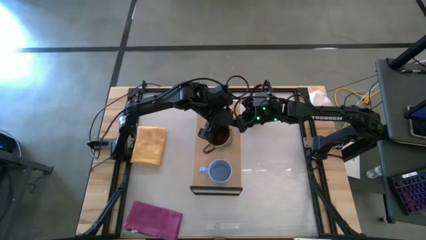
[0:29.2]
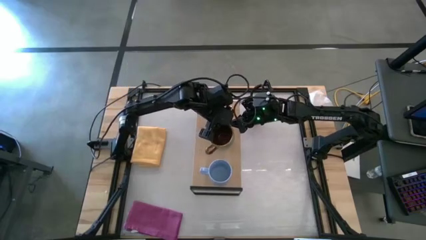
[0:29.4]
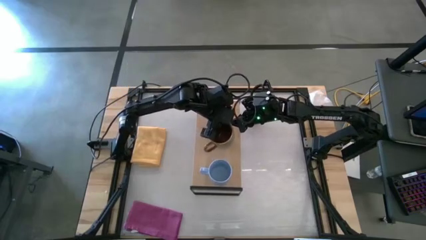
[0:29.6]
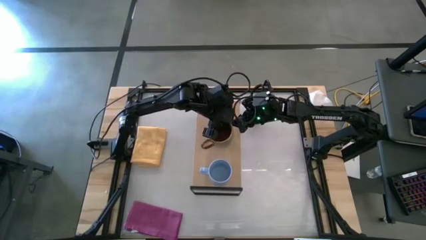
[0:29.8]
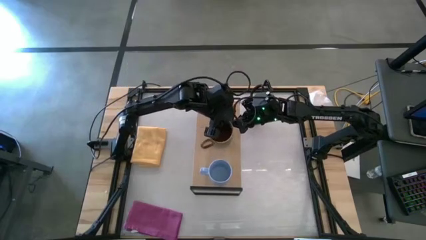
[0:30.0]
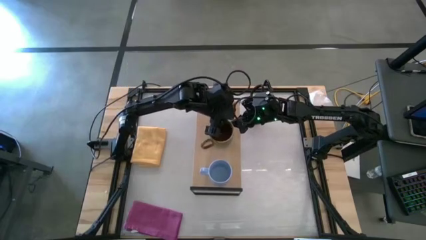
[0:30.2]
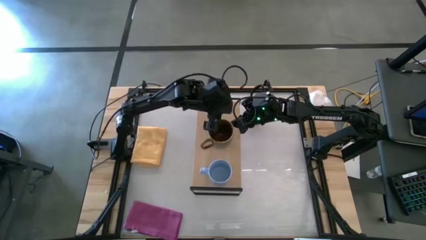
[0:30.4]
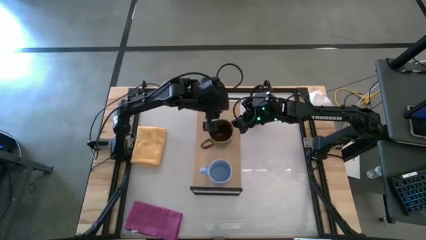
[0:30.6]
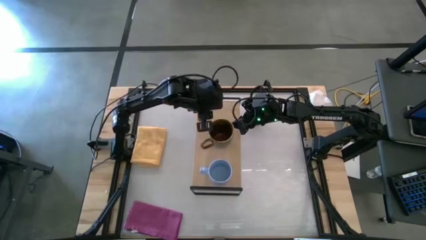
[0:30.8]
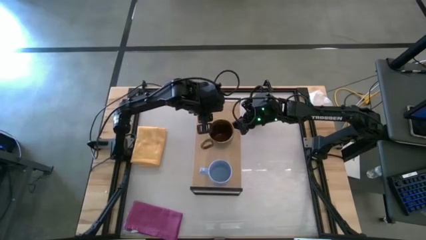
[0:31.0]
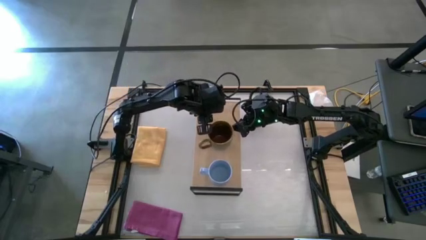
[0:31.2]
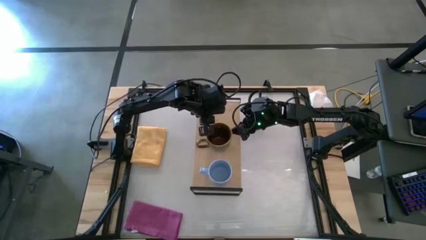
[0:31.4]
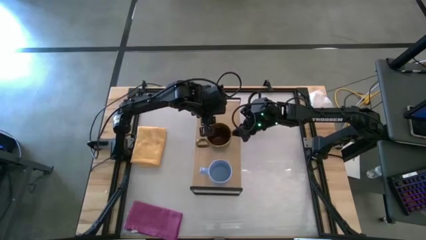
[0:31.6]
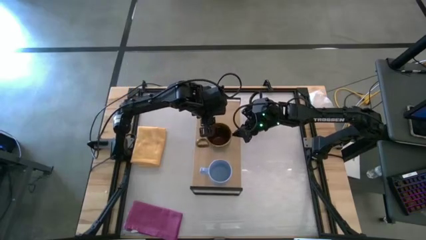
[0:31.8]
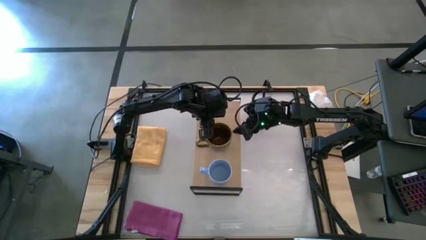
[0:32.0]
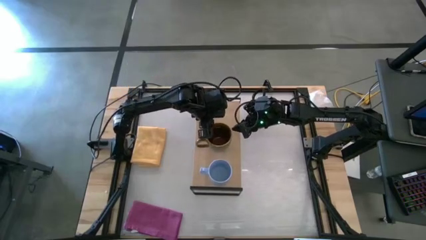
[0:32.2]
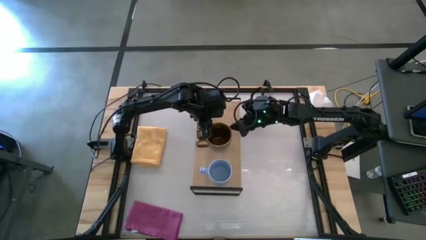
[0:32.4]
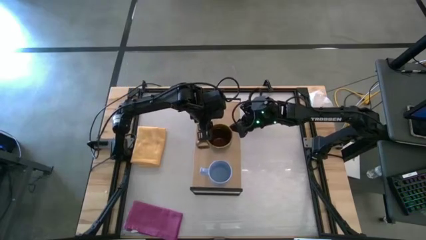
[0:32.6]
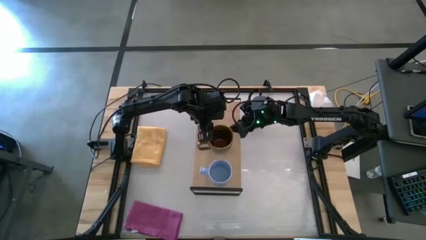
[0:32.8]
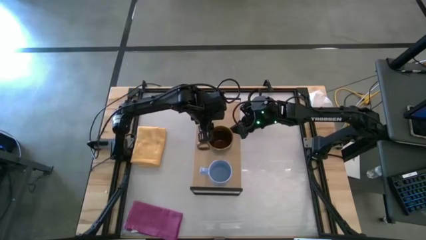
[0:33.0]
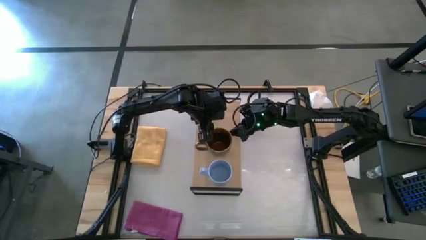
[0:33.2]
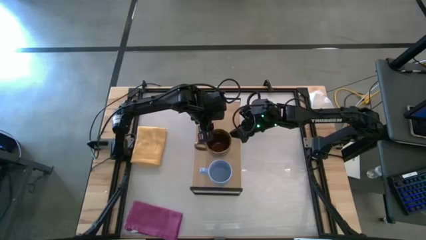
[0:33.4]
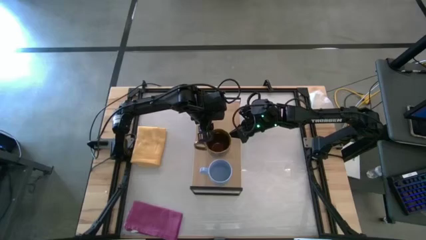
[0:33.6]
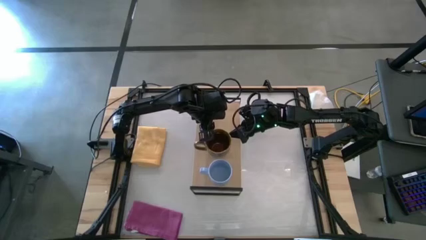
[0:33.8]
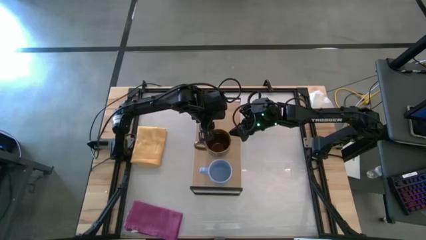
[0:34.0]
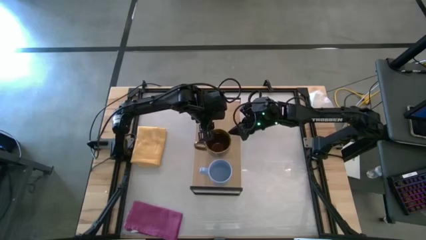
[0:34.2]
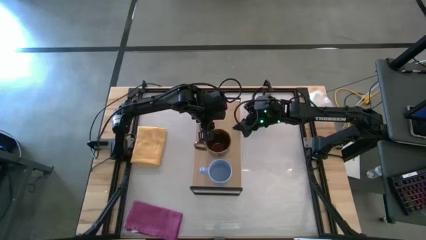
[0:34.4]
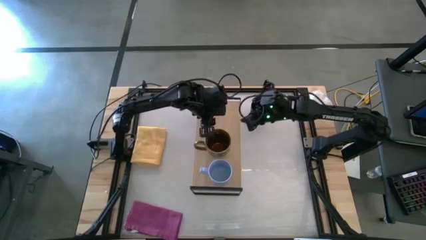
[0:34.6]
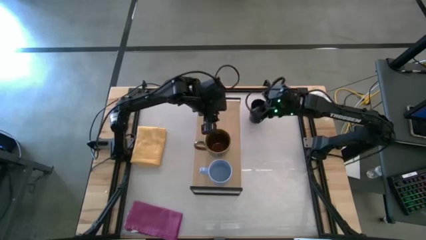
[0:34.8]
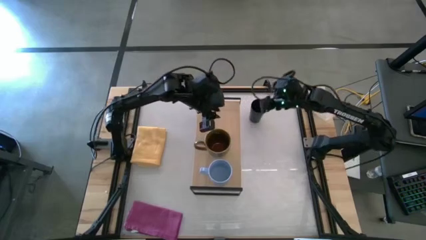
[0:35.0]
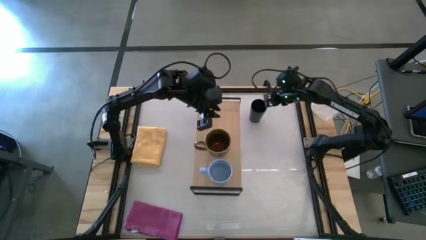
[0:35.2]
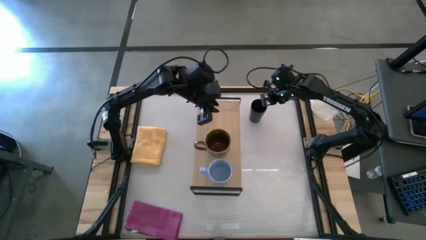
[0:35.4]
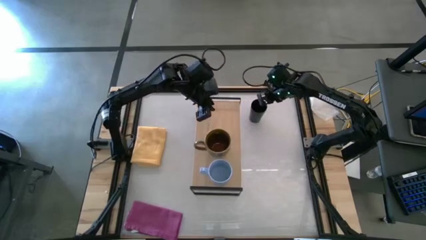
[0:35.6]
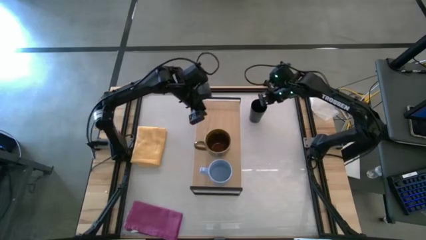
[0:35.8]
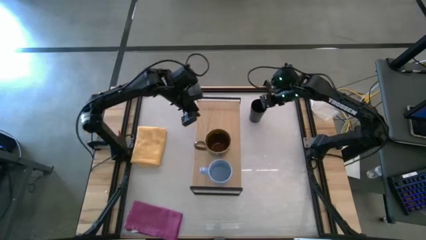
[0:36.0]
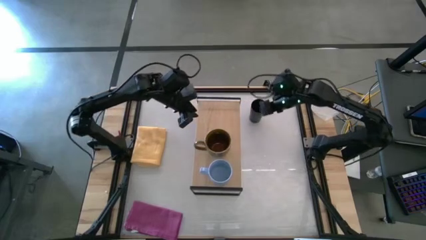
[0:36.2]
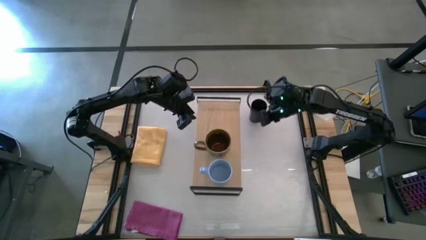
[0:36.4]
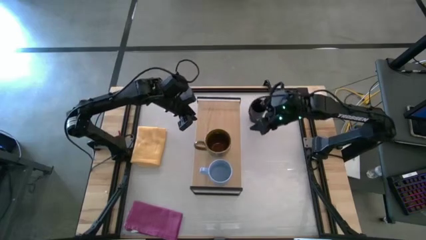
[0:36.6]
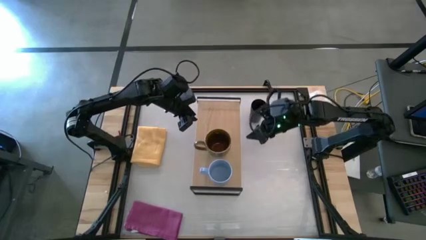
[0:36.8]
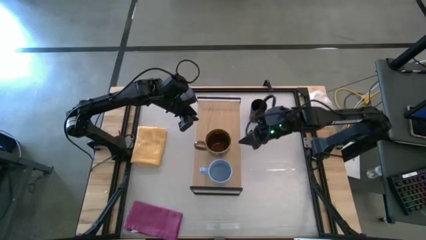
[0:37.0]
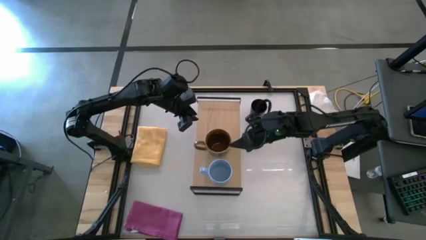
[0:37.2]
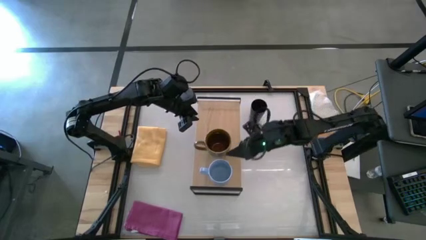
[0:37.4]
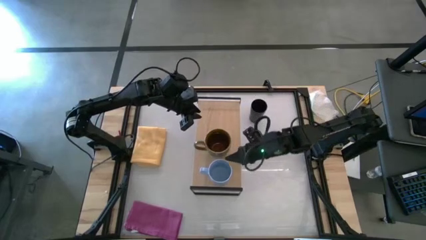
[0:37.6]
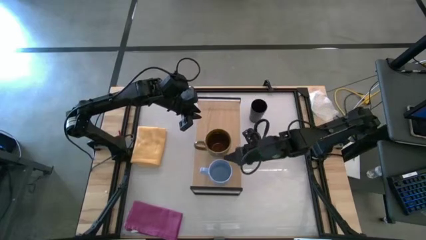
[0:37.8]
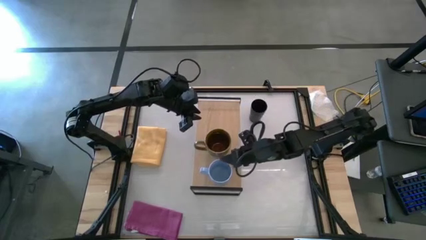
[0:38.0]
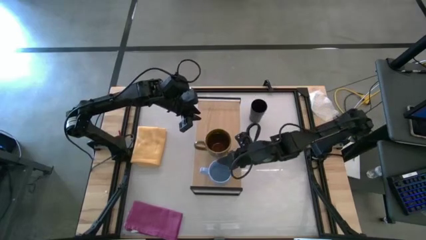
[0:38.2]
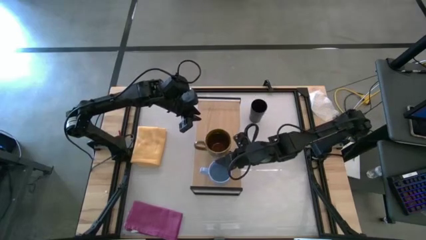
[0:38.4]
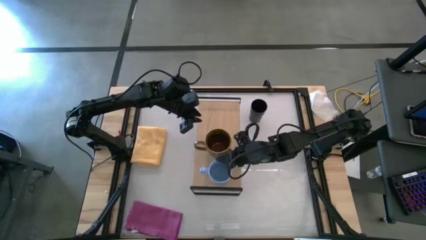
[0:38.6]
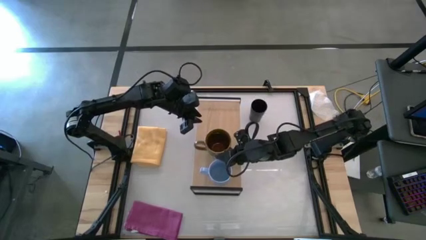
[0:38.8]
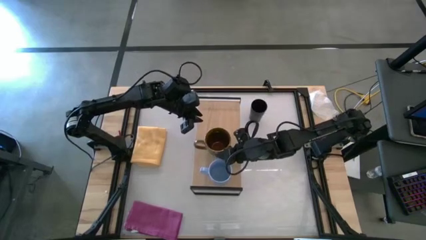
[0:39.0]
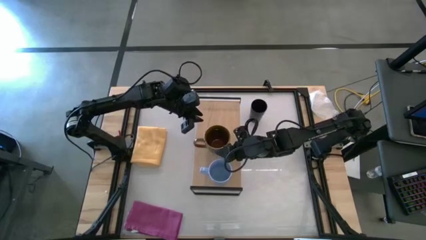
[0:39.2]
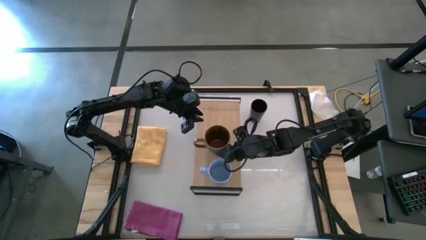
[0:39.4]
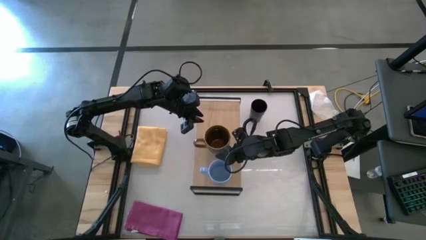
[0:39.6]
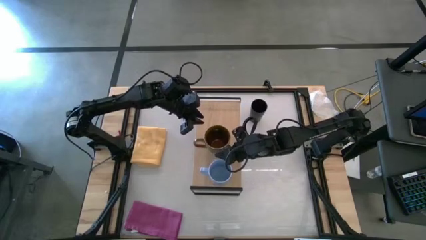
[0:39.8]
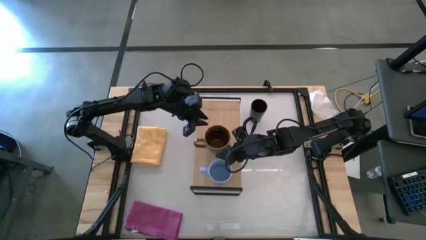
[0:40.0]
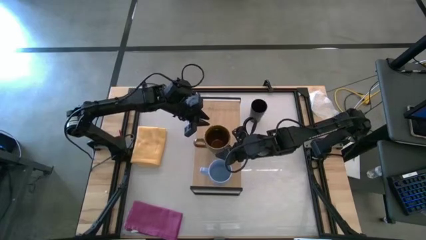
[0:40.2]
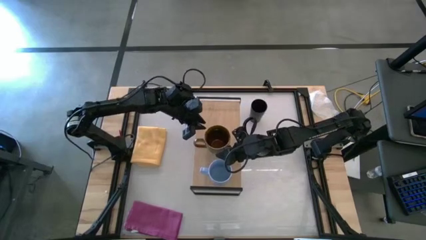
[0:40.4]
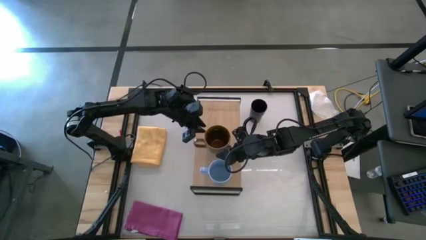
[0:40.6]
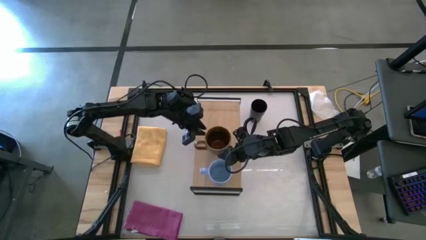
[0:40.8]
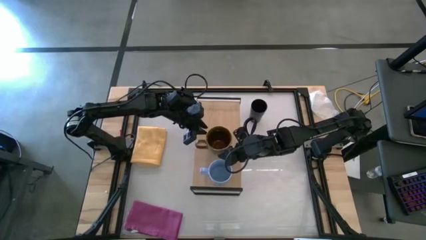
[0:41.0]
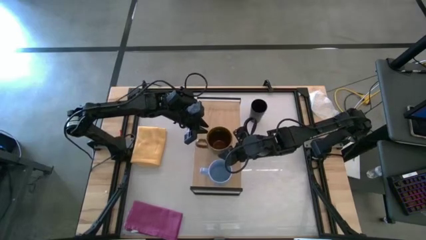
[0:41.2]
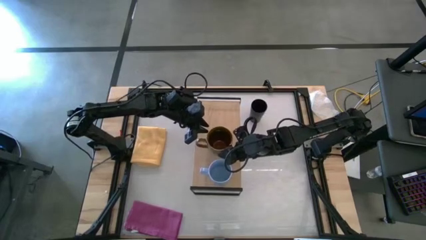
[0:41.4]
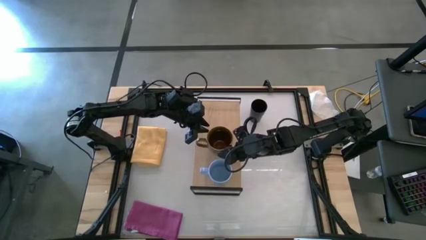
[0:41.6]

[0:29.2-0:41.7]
Task: Stack small to large cups/mugs on shelf
Put the green cup on the shelf

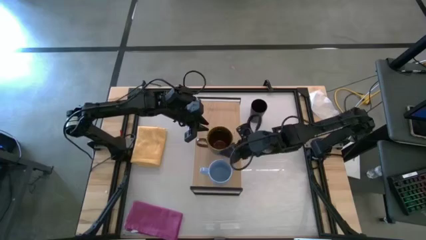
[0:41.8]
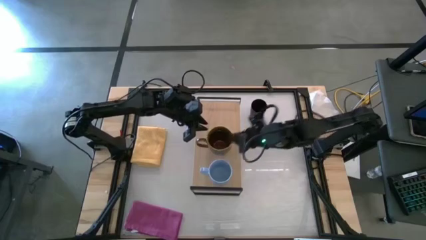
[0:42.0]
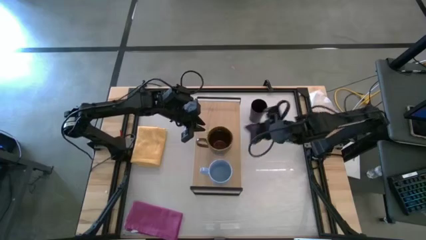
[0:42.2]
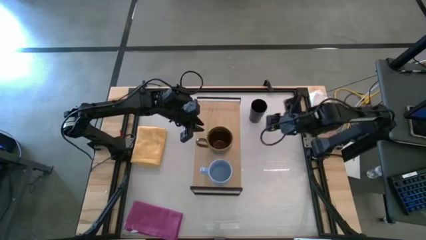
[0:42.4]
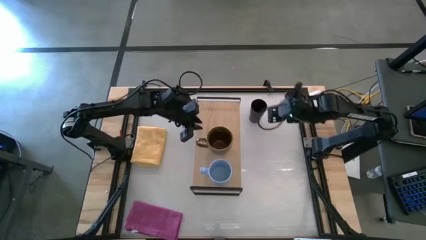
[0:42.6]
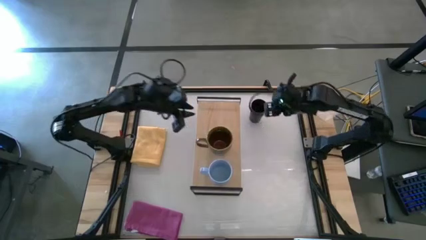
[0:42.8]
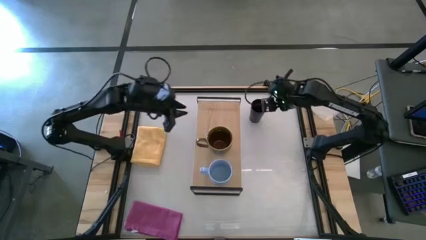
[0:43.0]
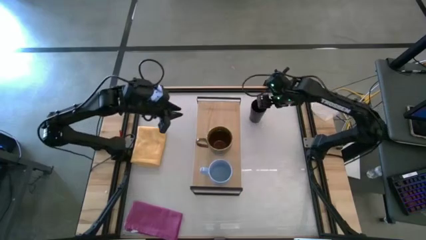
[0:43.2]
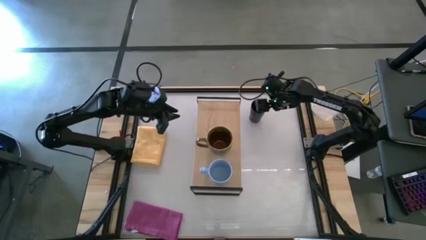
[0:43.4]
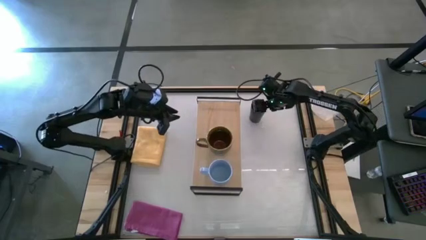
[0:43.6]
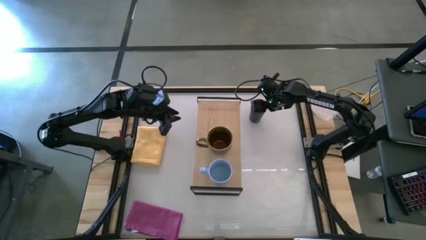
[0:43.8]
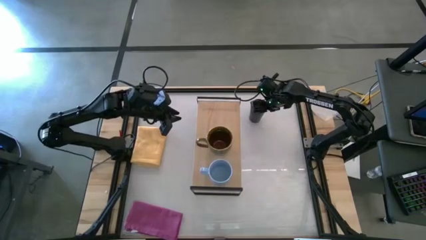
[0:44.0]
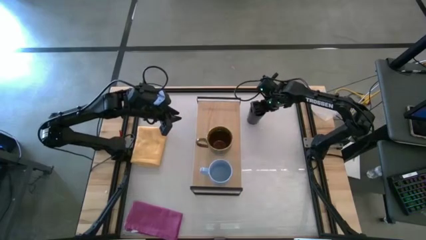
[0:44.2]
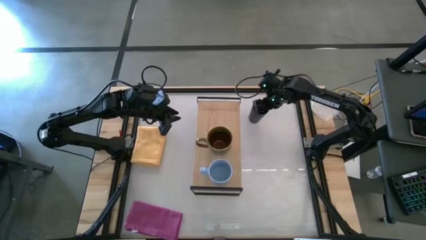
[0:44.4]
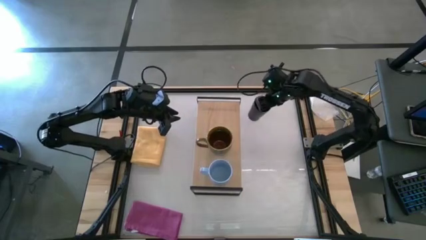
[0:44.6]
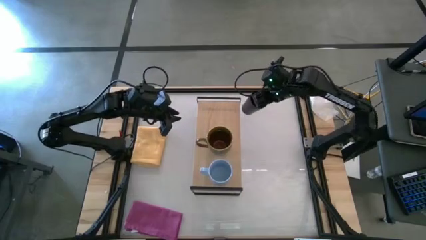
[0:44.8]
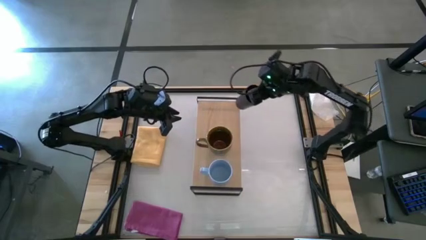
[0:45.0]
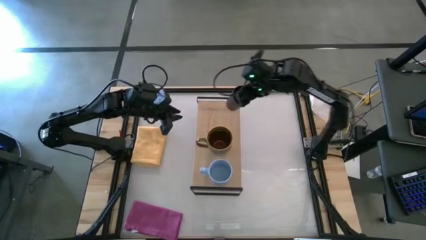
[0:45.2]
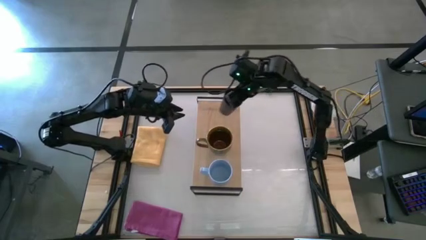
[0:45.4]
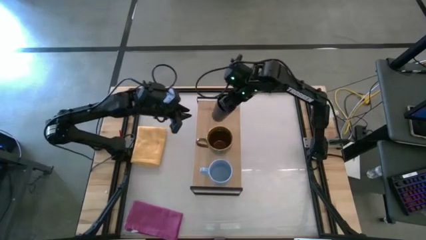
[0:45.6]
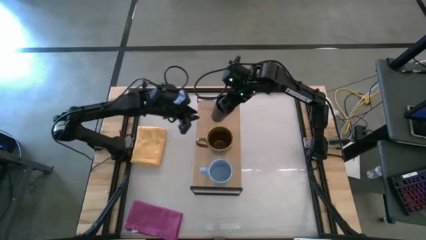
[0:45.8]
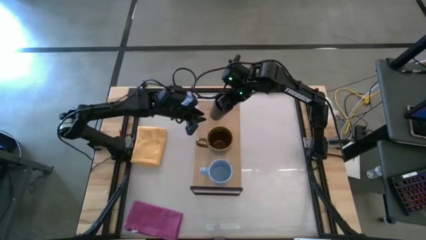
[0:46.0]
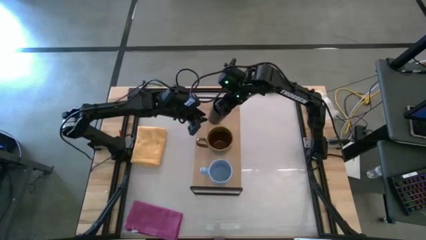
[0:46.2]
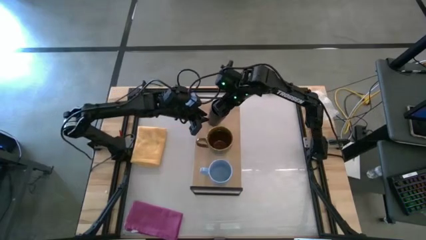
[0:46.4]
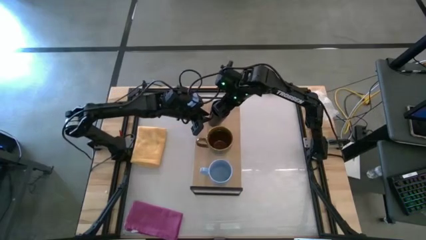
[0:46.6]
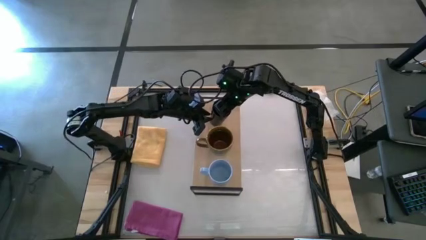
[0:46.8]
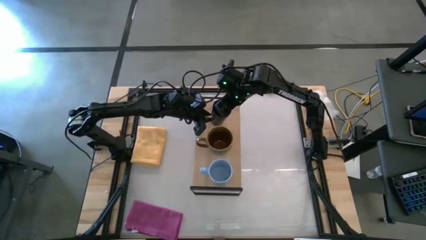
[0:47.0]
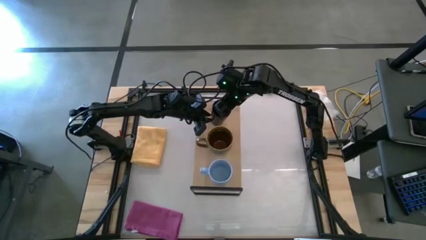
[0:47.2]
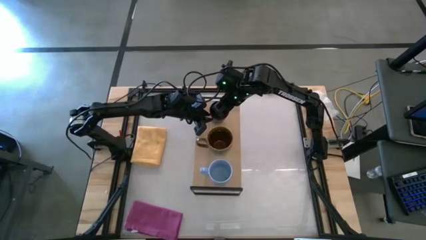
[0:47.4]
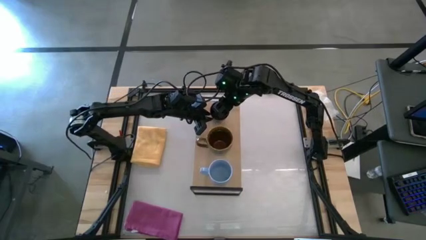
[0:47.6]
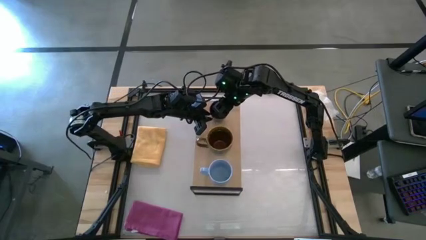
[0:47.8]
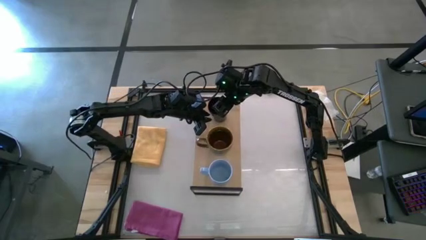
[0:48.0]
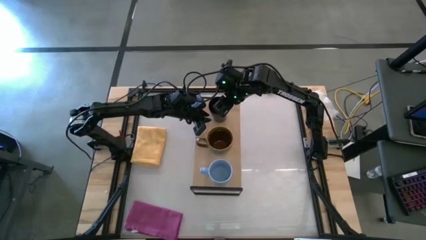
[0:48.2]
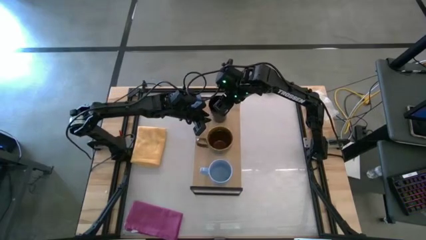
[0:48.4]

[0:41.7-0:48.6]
Put the black cup on the shelf
